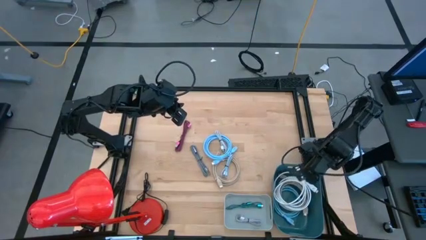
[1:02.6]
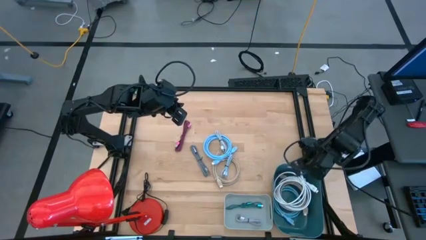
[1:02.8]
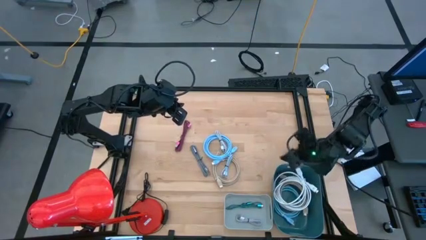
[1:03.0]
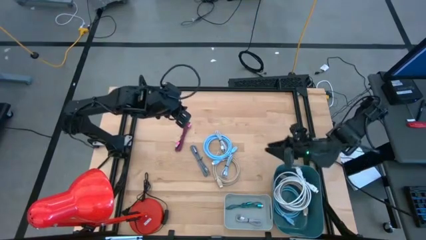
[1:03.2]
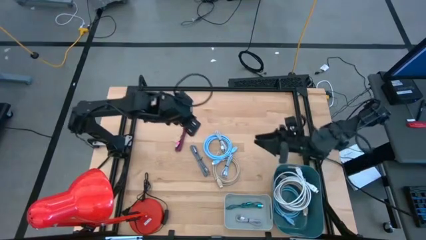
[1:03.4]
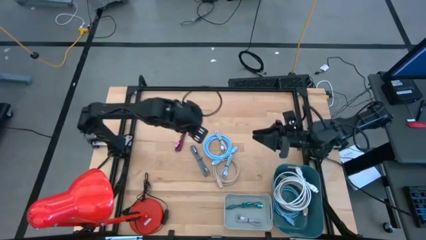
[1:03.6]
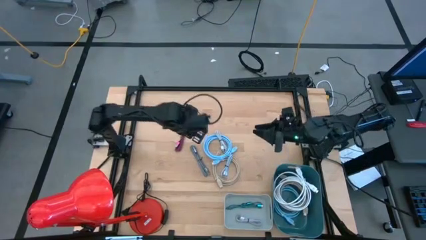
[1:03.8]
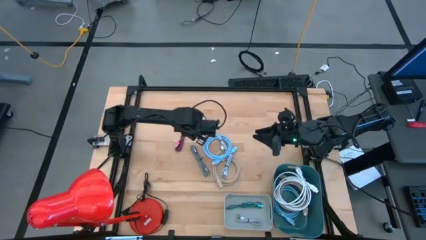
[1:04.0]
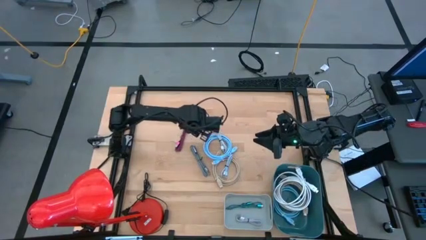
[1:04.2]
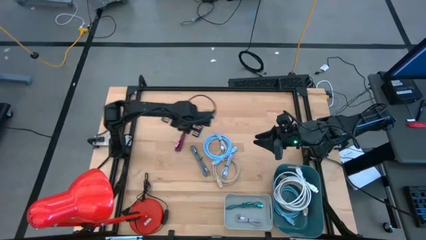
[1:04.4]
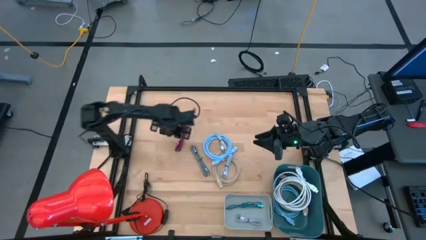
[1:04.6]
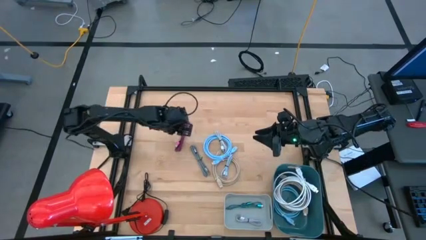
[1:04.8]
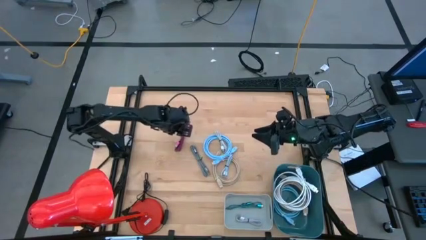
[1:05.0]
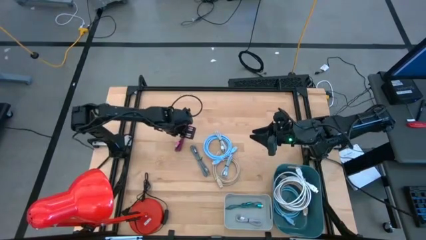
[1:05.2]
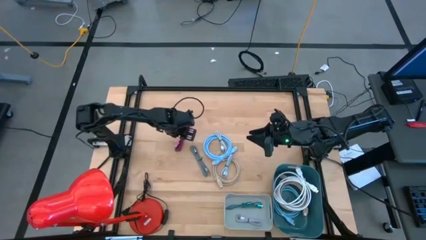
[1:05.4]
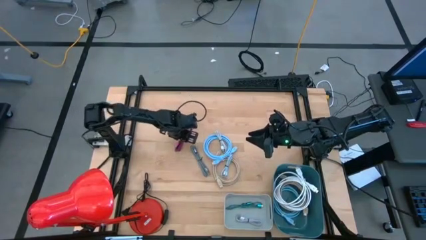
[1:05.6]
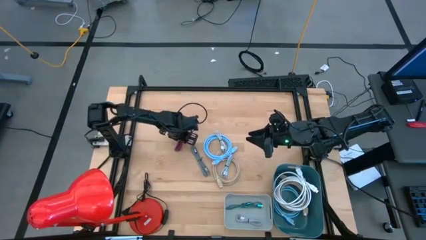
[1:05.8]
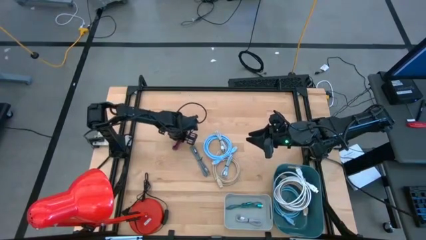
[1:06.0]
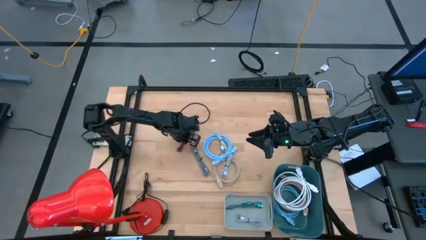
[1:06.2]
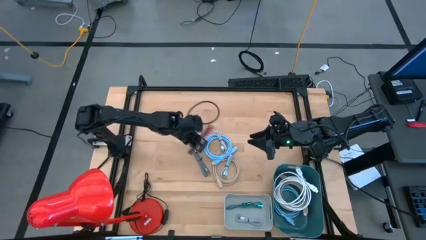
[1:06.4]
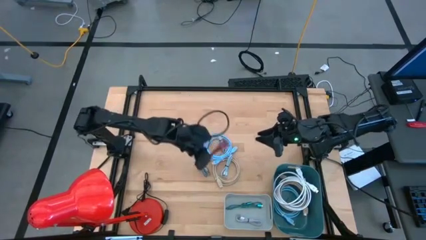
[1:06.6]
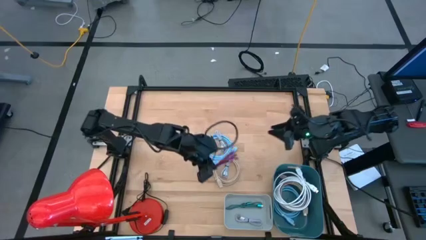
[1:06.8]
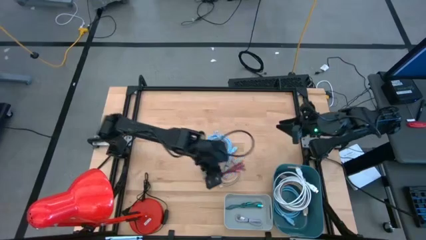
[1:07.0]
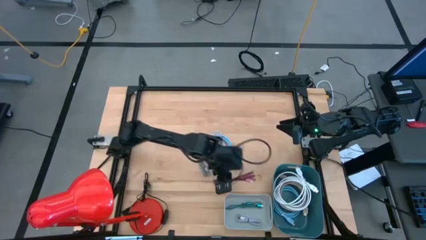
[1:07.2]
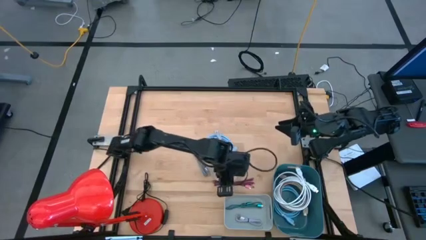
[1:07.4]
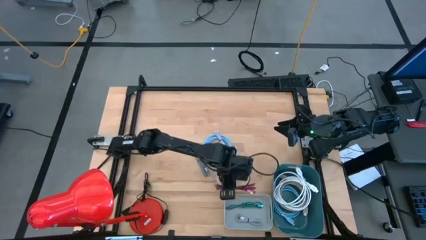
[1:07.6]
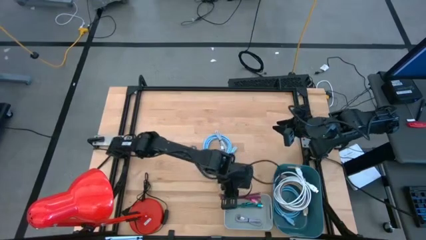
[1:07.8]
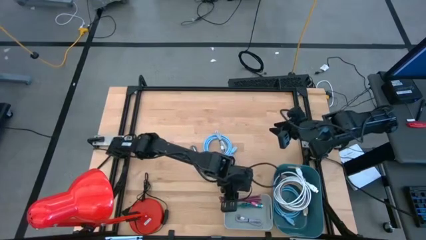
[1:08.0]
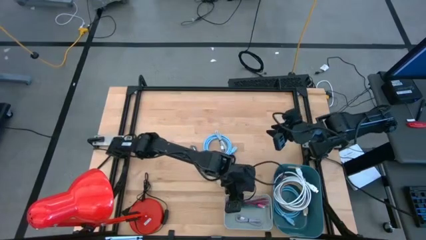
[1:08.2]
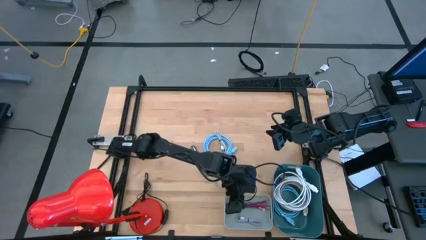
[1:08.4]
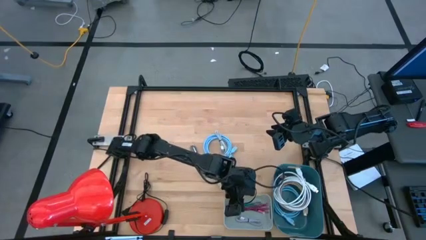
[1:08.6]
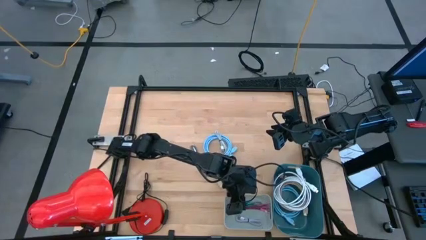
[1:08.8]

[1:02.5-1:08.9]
Task: Pick & Place USB Port
Put the pink and black USB cable into the gray bin

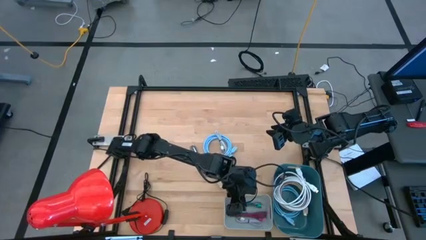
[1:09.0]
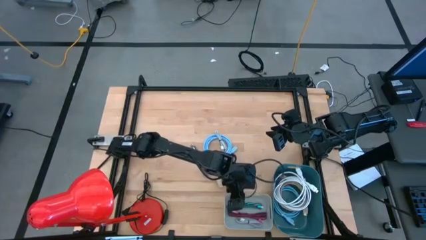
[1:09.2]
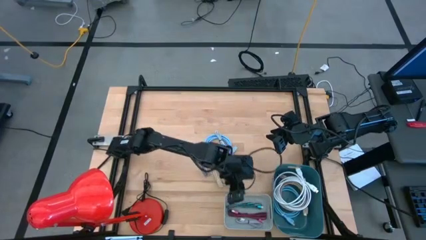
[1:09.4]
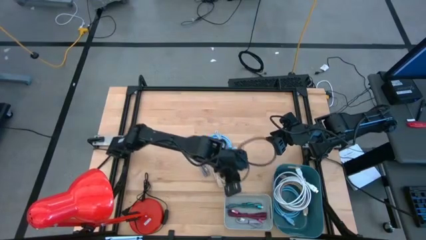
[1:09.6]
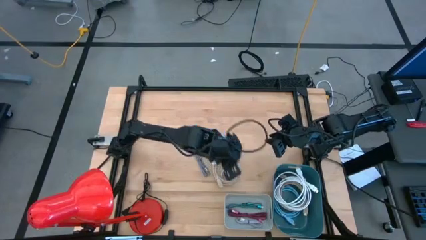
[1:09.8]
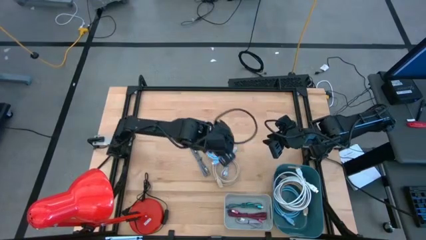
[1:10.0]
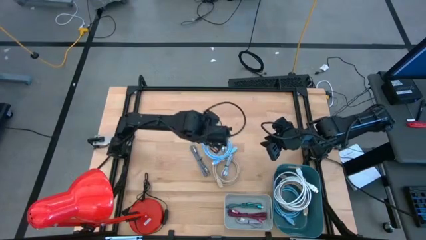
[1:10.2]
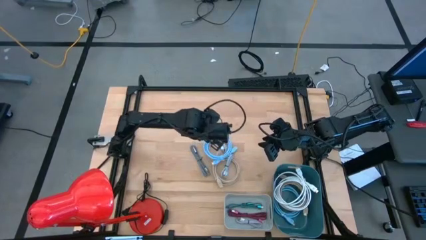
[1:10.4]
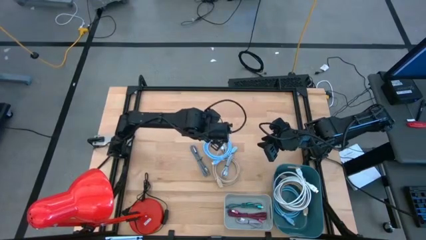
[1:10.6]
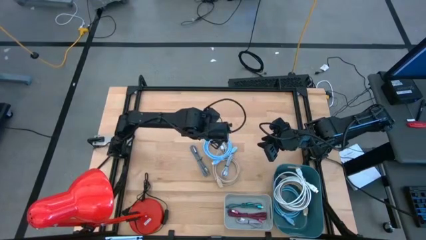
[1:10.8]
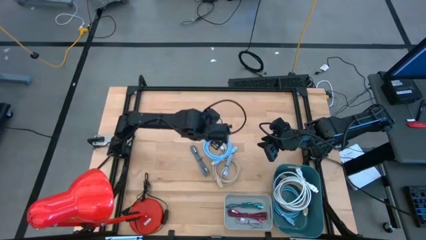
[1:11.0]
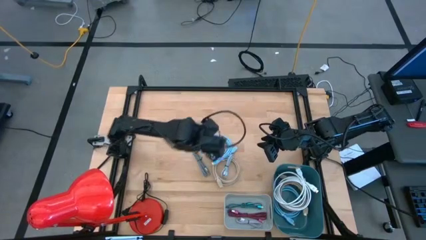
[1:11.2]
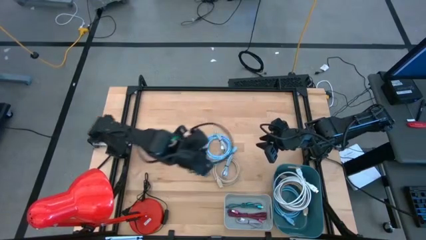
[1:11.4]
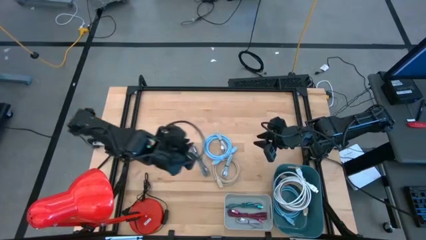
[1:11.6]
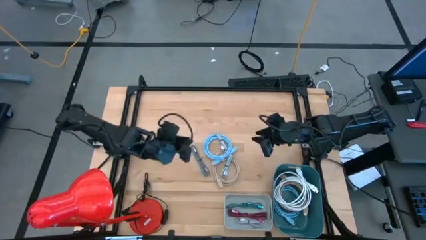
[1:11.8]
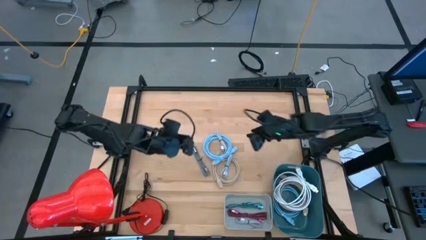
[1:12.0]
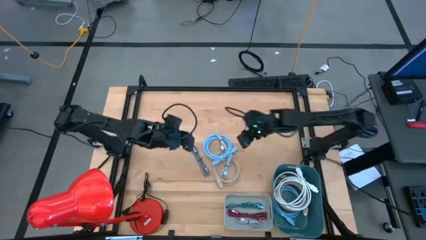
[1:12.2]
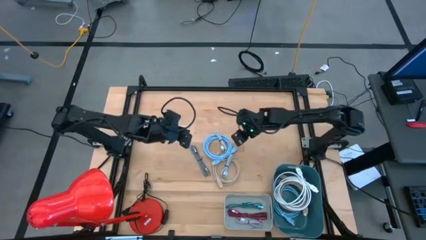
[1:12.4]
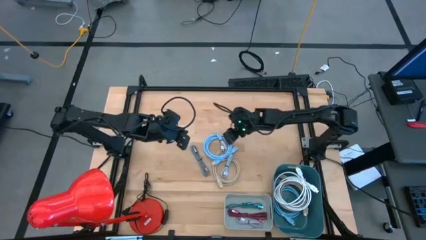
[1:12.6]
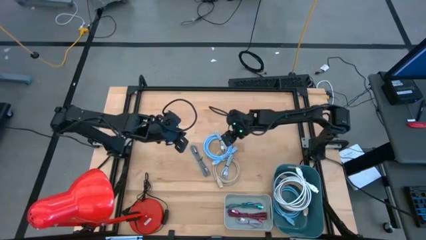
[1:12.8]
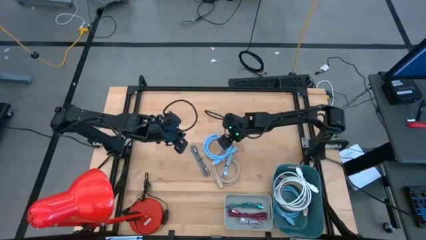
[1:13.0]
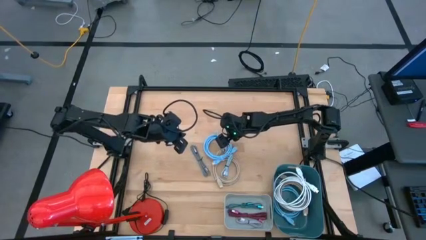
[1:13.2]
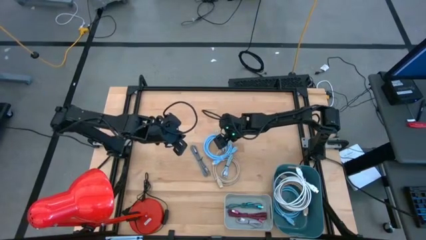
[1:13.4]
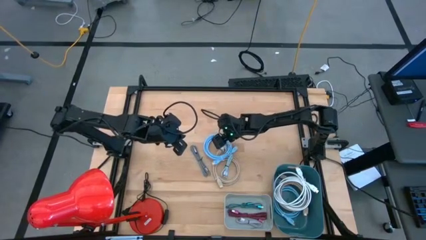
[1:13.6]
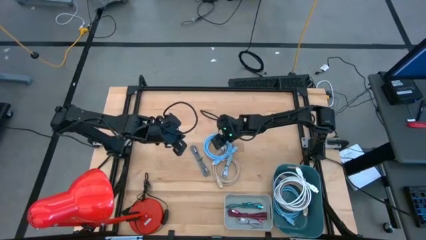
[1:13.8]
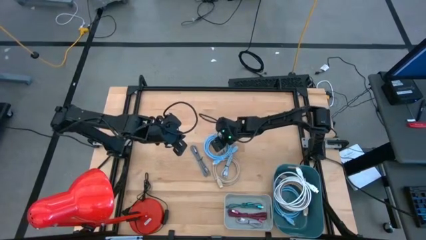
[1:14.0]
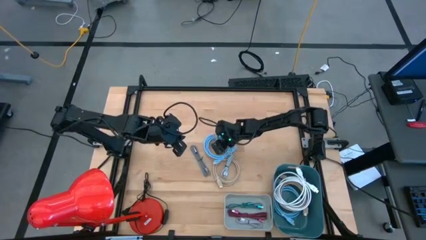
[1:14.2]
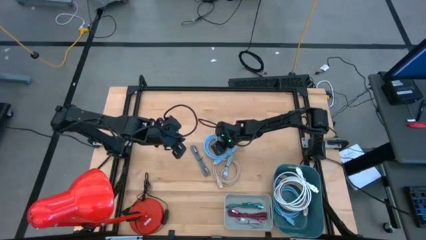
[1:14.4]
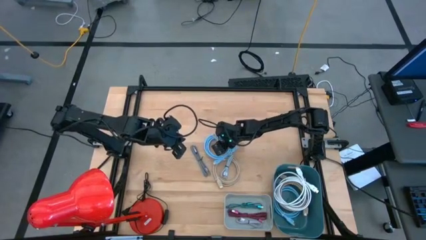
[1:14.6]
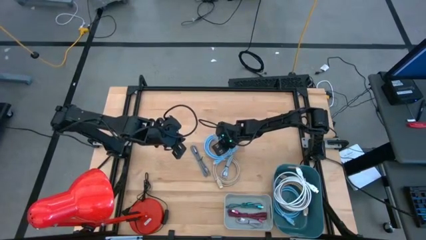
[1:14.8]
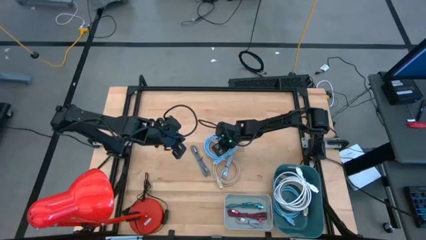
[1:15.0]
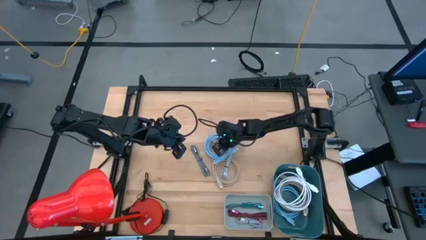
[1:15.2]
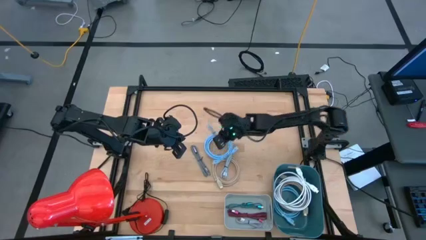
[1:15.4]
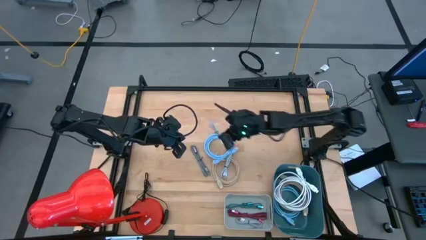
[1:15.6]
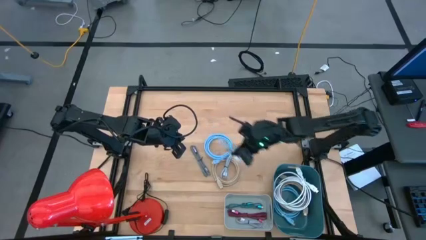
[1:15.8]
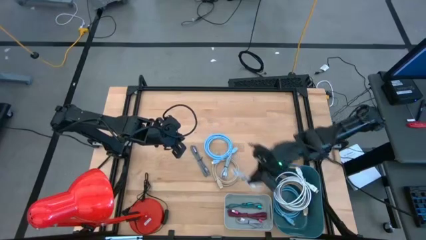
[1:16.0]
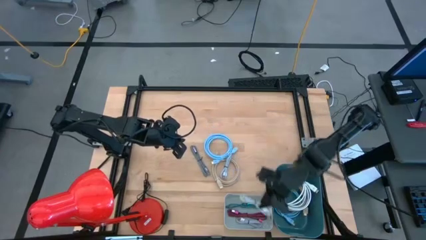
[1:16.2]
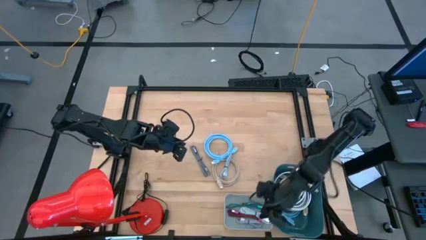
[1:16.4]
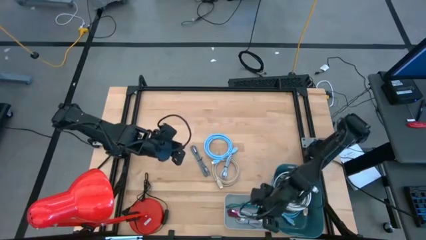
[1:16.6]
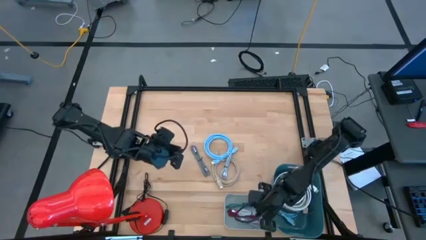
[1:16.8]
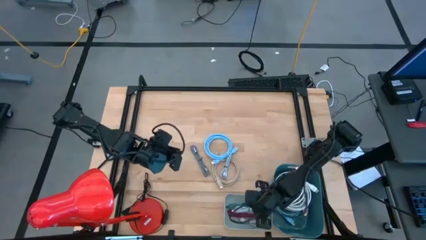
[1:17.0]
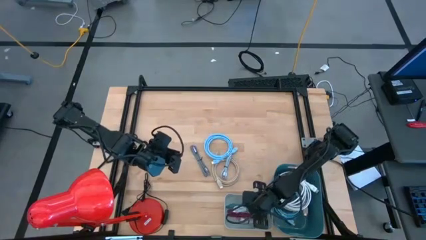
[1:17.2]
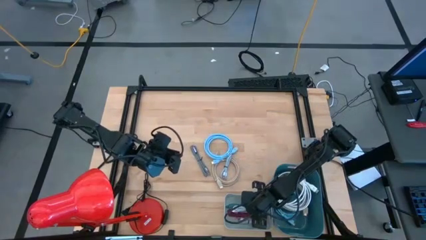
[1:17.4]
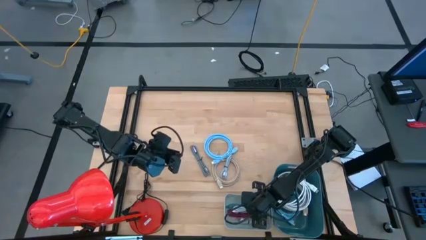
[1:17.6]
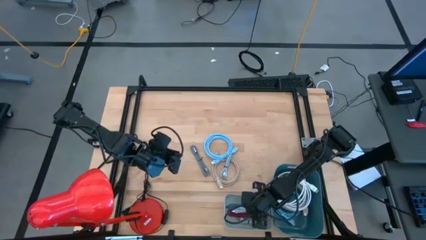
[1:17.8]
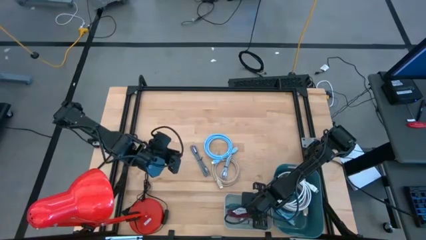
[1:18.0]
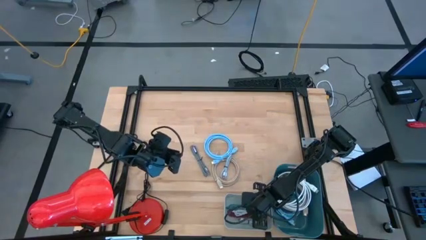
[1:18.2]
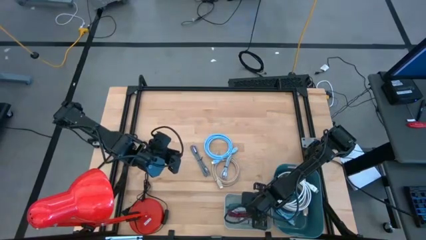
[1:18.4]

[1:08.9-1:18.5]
Put the top light blue USB cable into the gray bin
